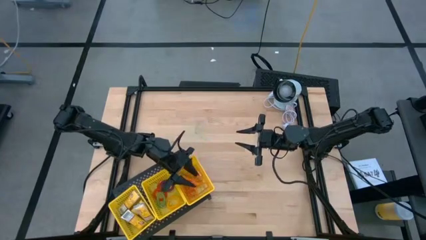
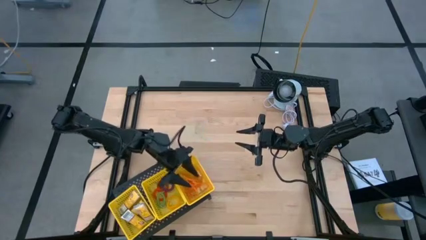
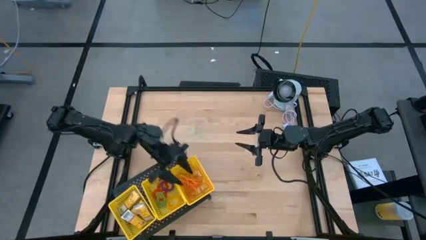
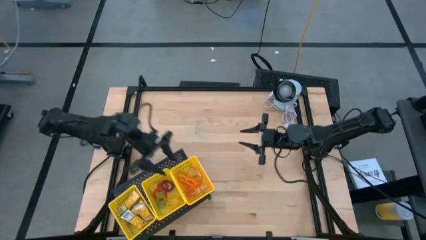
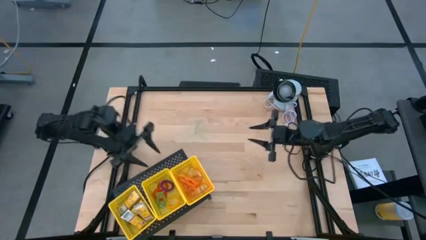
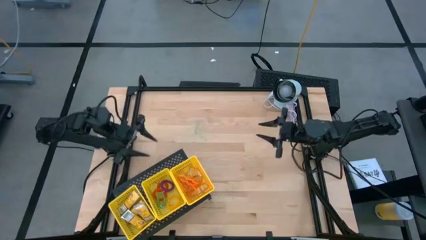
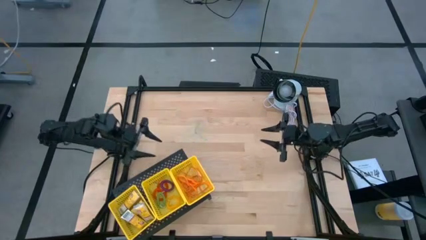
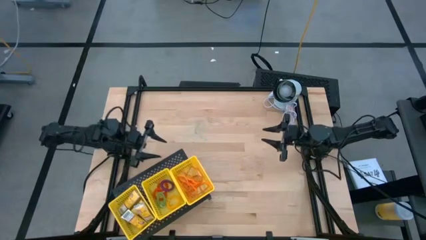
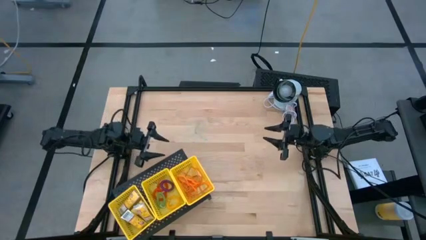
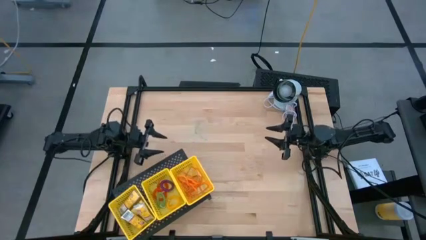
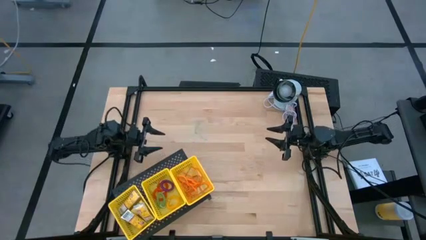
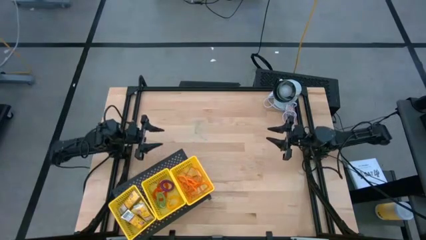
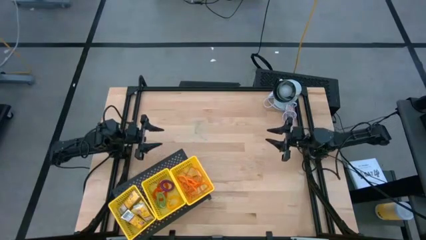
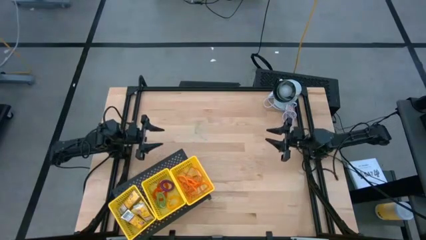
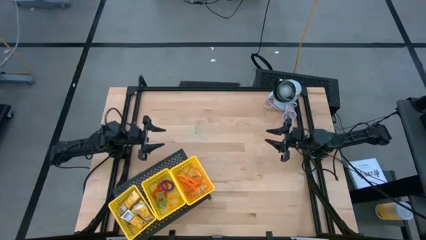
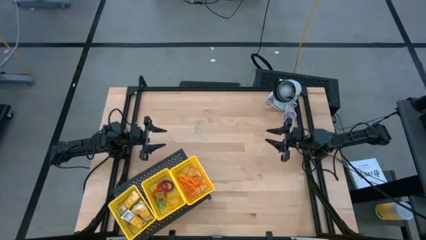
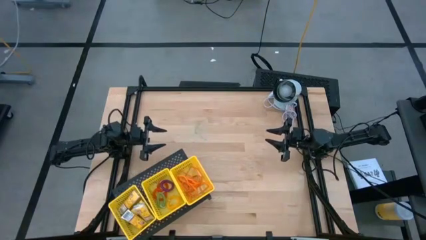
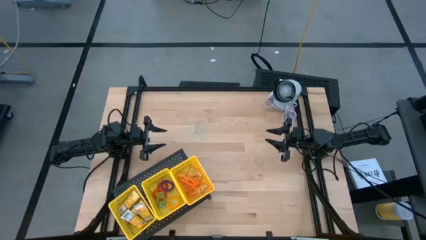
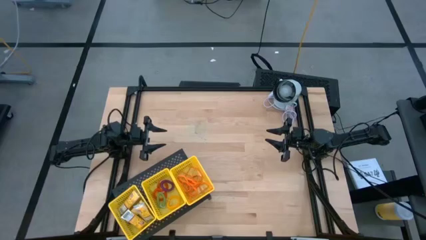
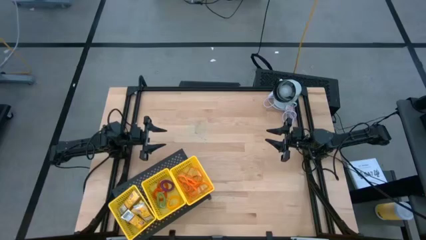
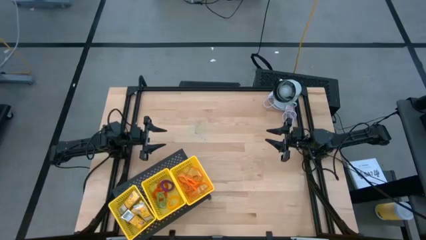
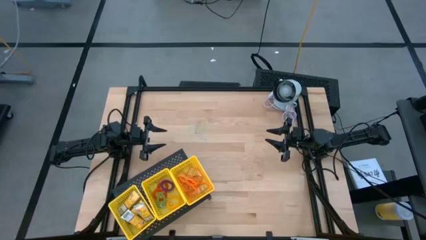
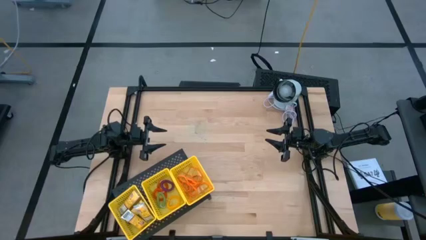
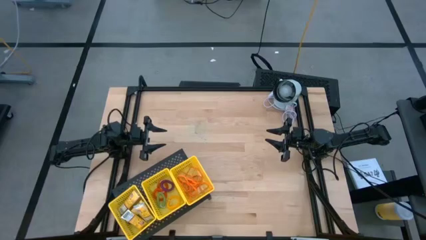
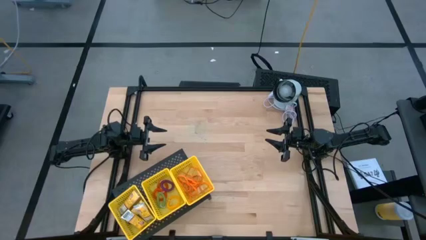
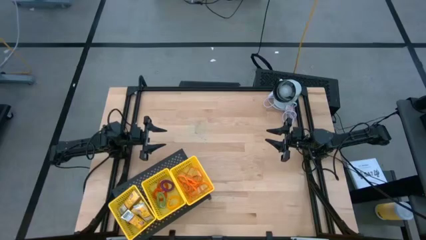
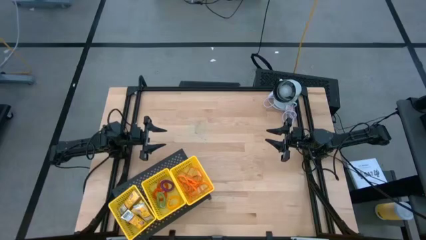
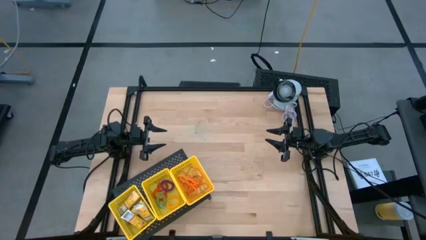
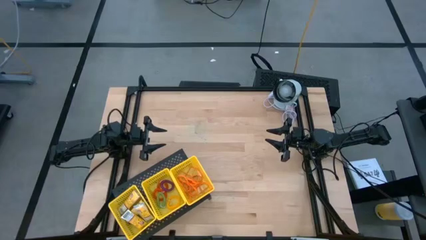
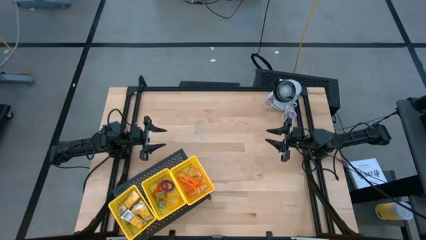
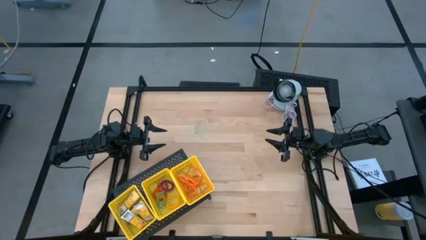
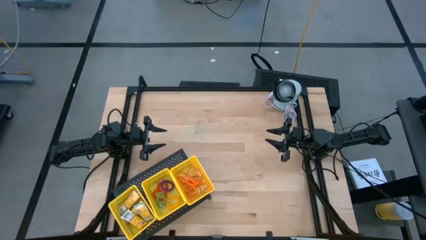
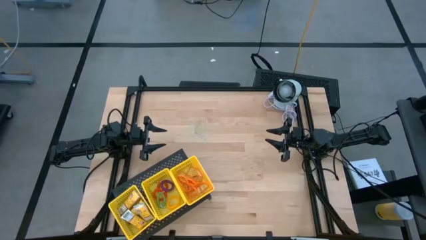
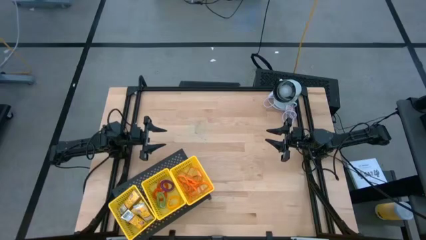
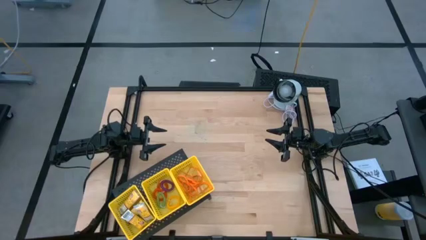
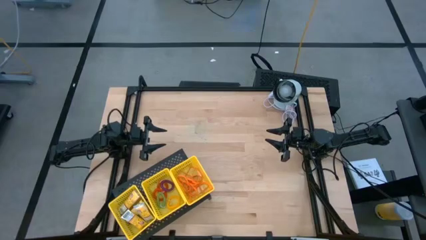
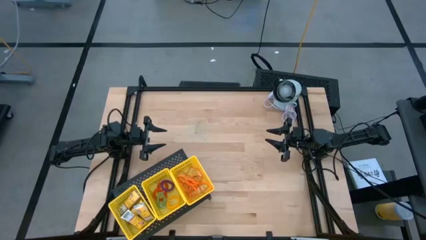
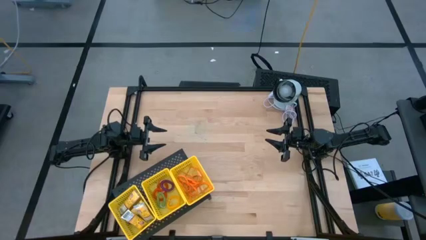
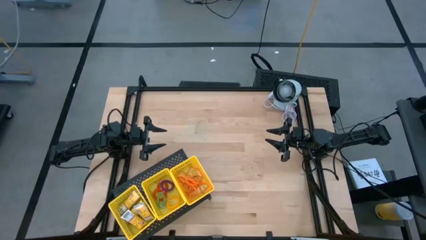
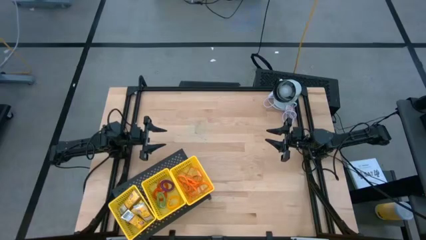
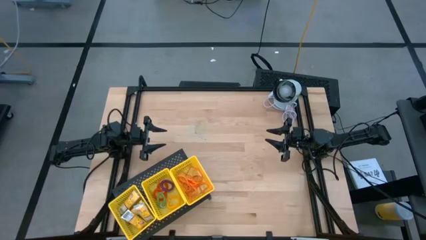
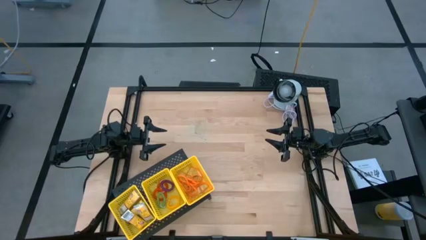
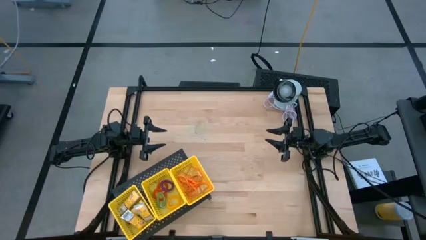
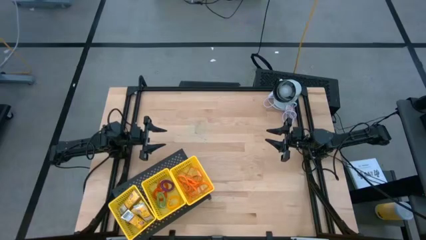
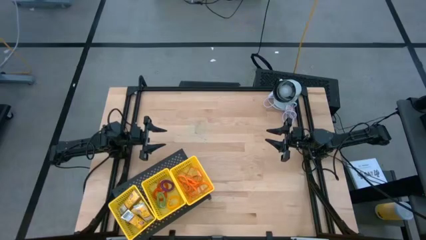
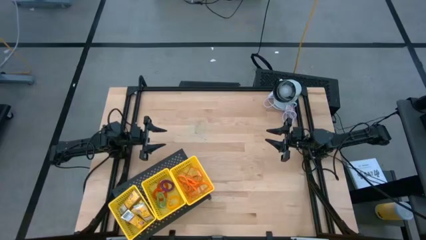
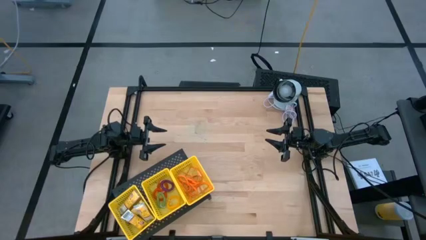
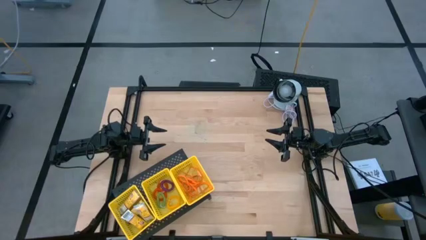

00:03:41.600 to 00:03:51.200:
Task: Pick & Place Office Desk Supplies
Return to Home Position

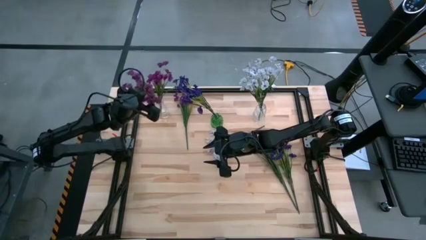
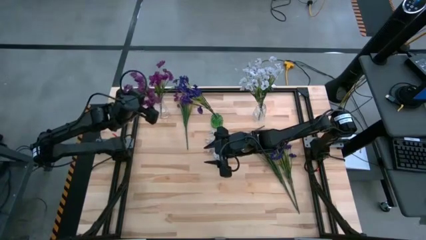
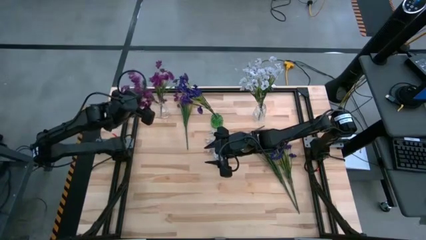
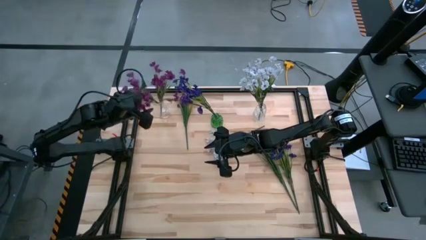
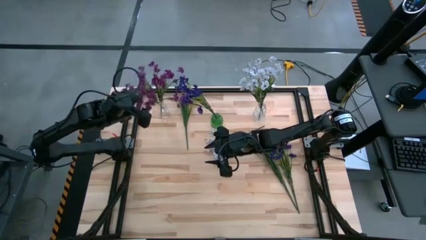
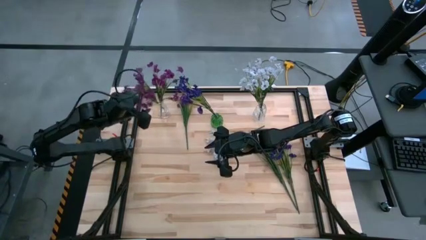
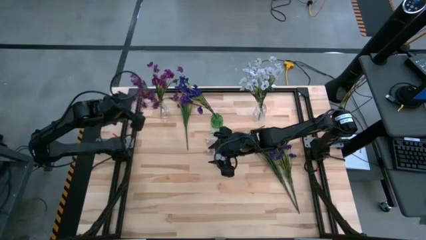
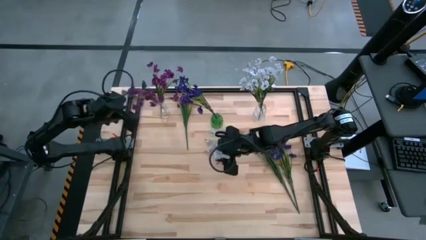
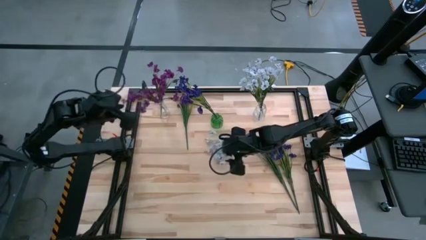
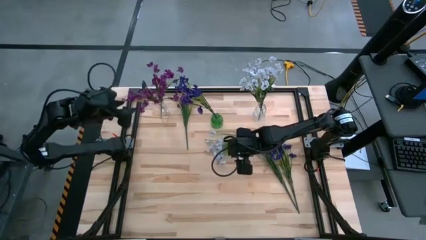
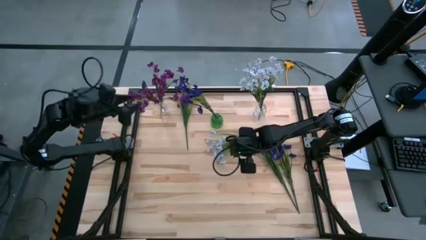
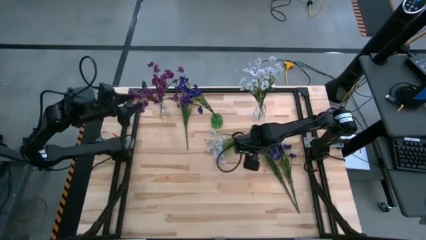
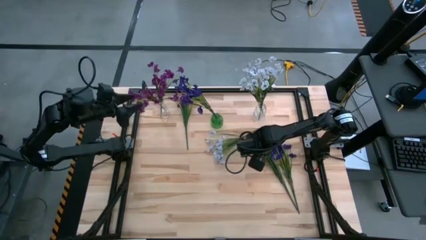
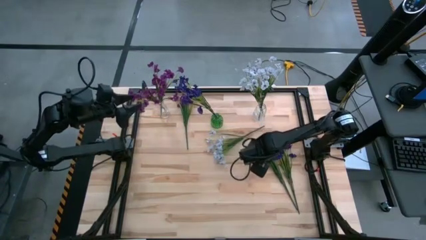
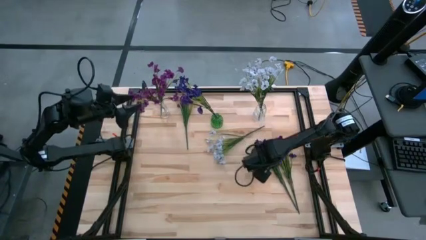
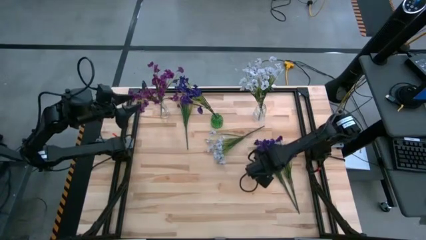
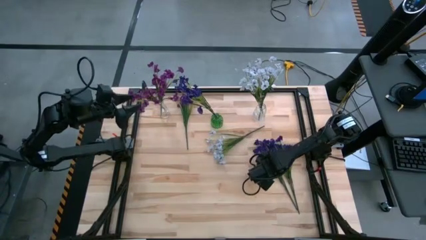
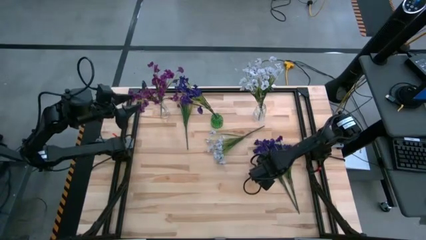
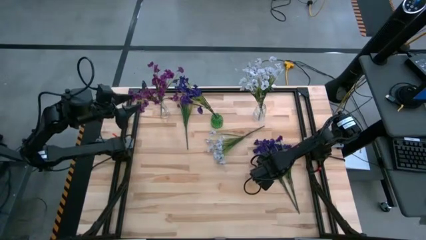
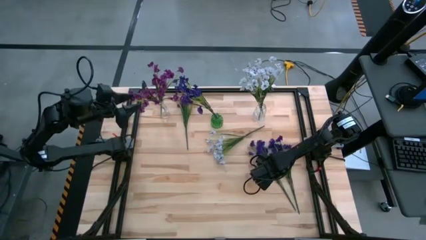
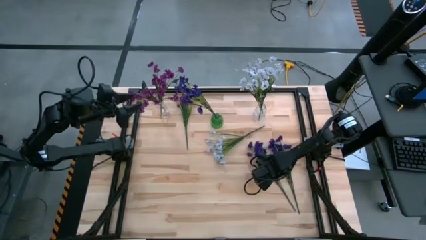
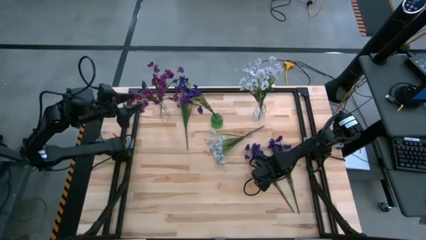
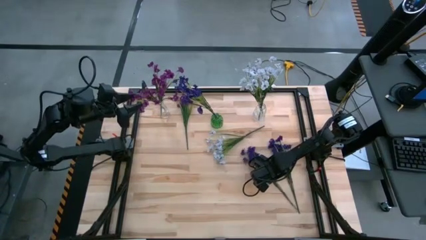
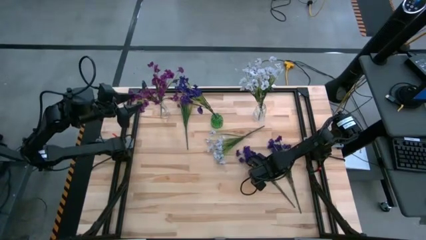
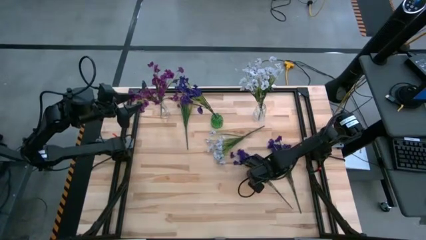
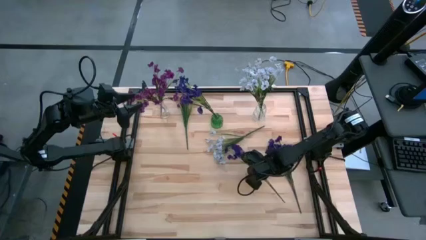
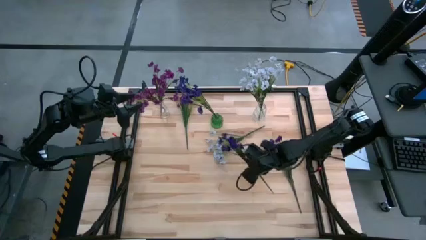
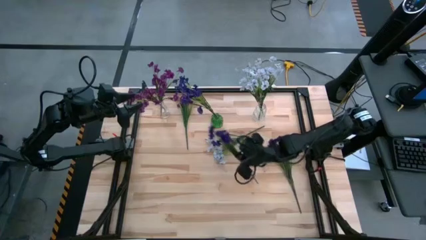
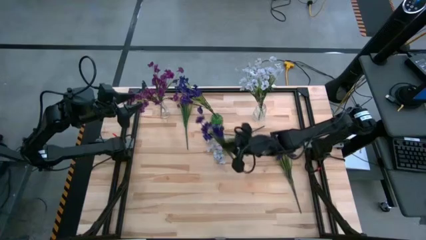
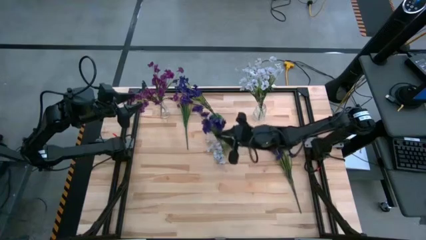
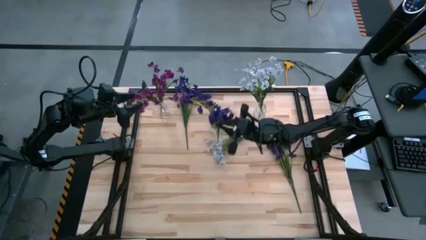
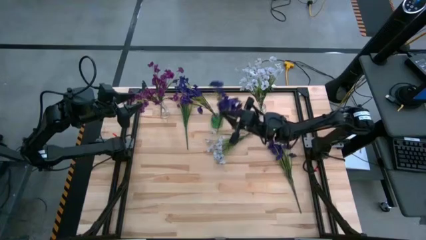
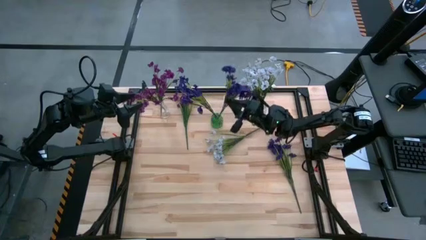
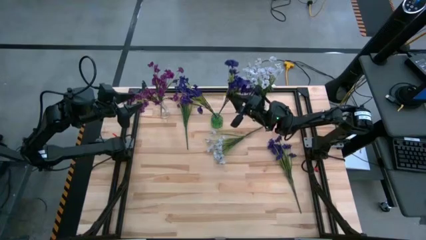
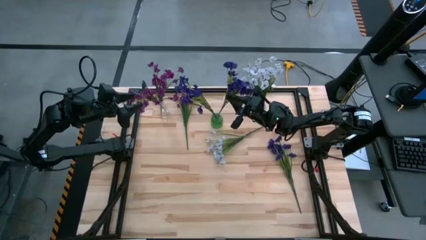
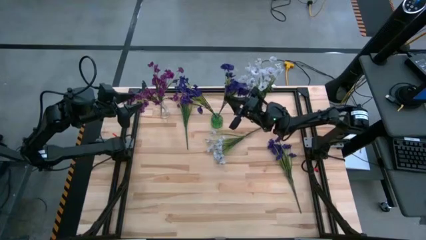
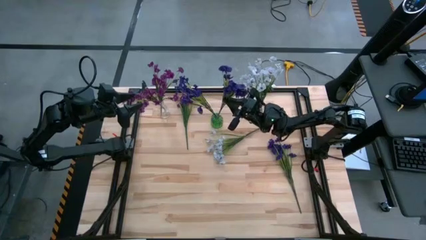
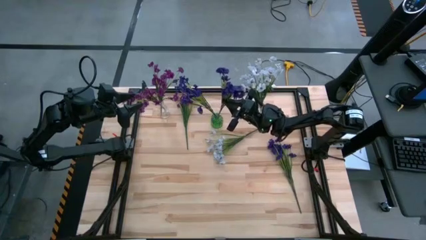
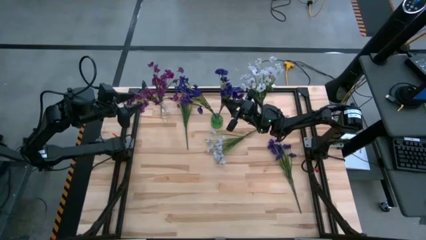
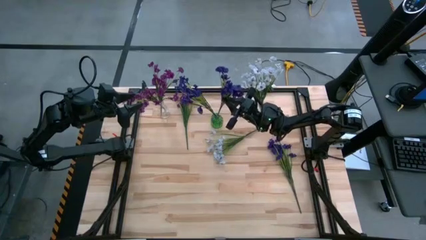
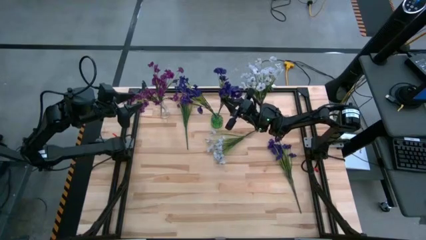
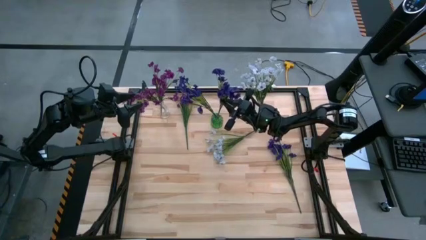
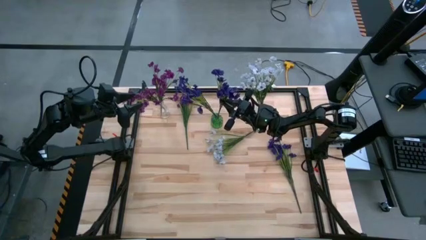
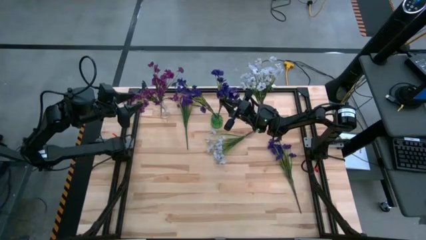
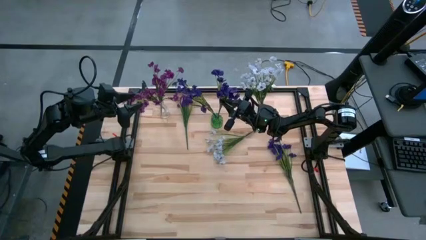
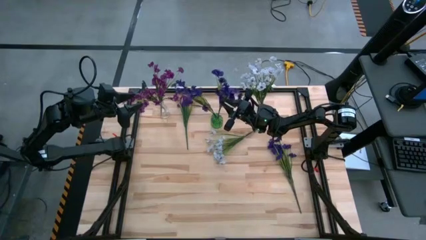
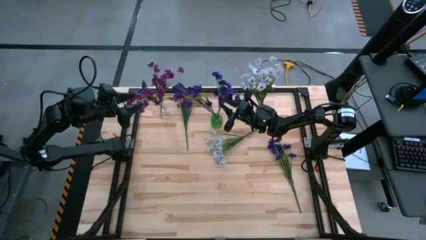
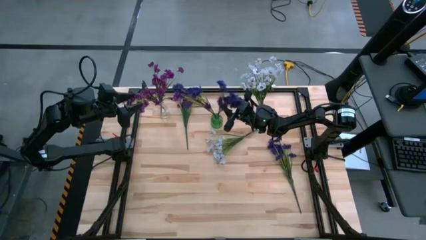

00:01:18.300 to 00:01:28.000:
Task: Sort flowers into vase by color
Put the left blue flowers into the green flower vase
